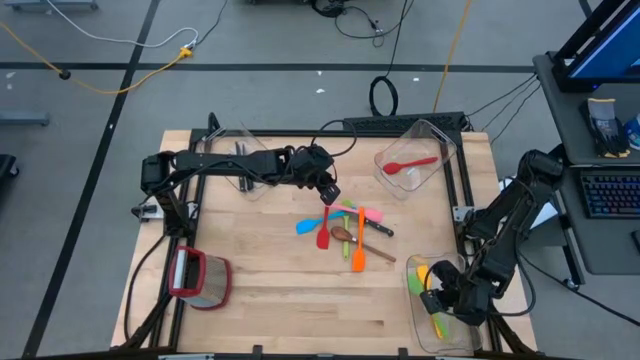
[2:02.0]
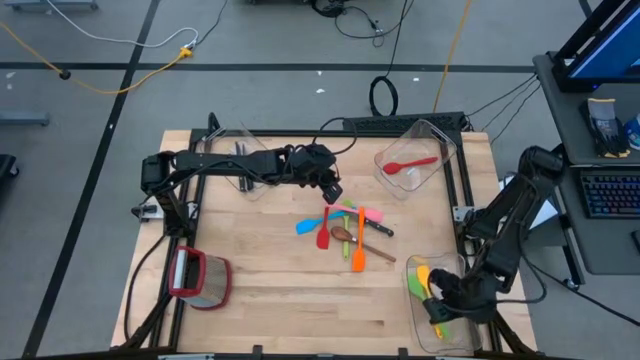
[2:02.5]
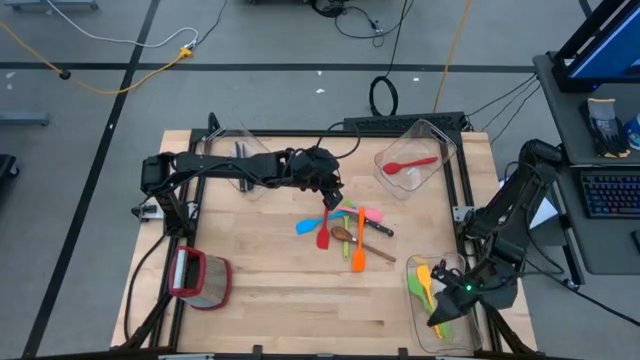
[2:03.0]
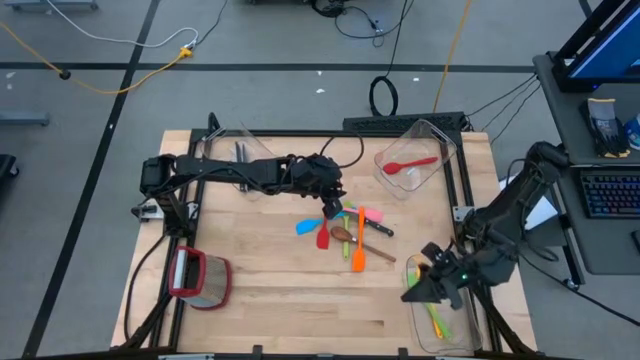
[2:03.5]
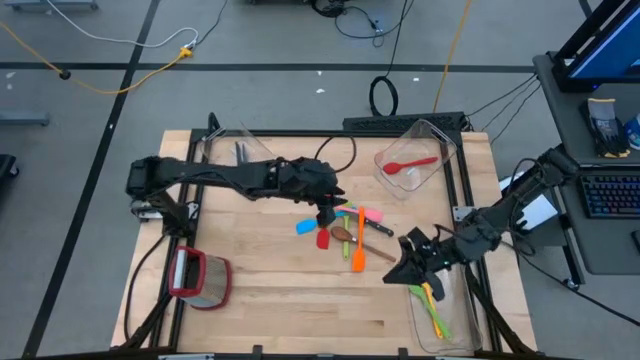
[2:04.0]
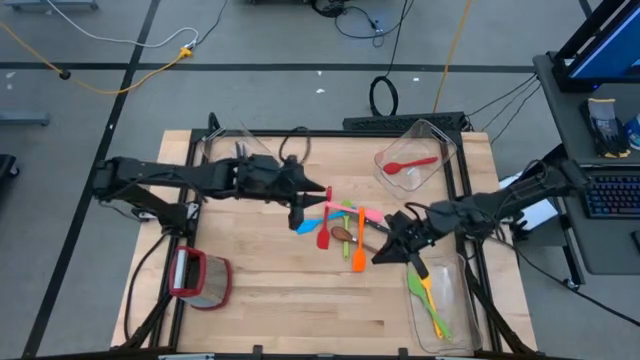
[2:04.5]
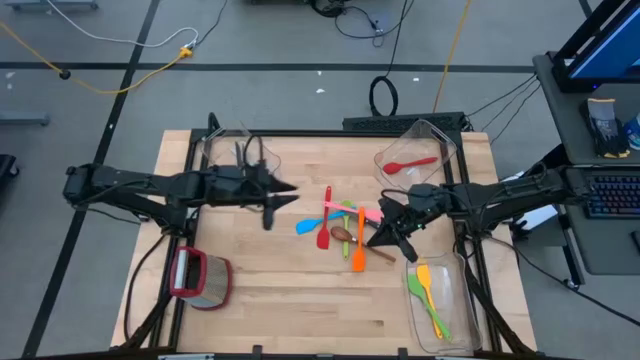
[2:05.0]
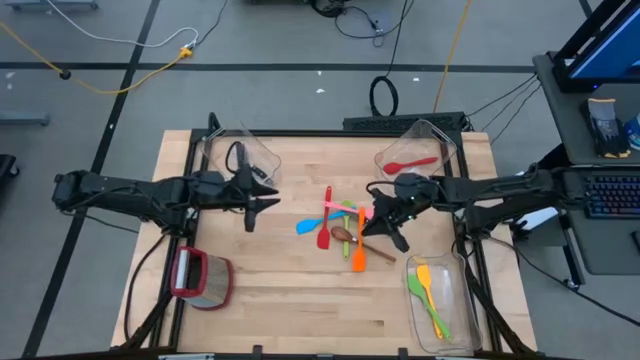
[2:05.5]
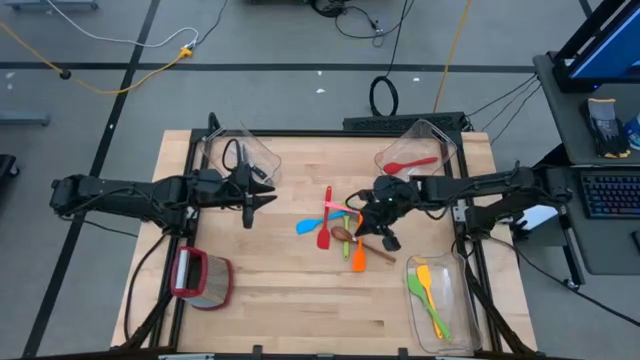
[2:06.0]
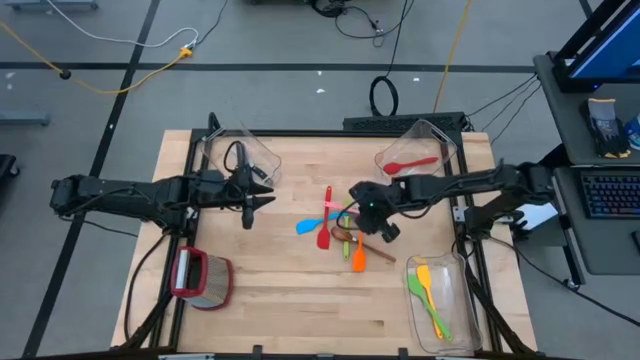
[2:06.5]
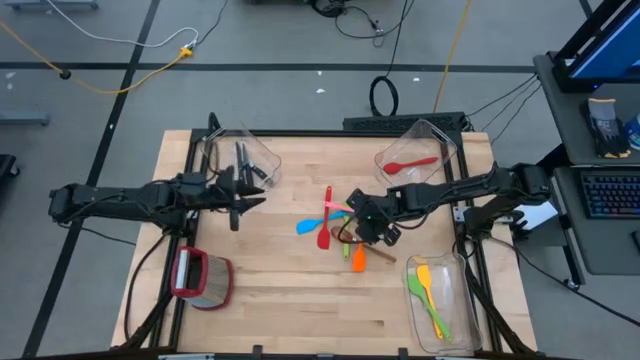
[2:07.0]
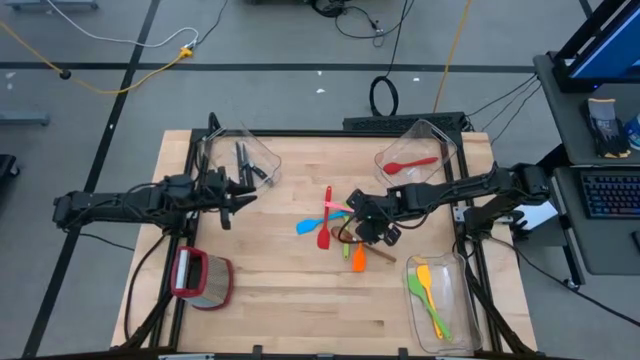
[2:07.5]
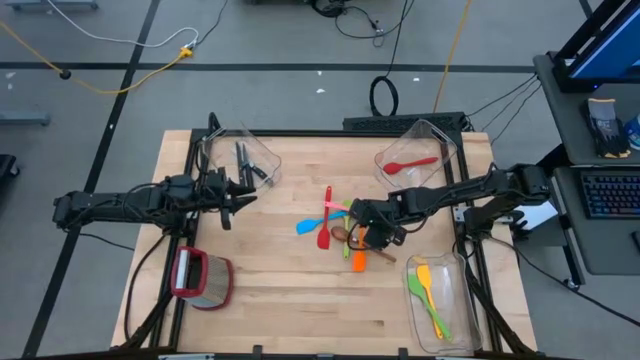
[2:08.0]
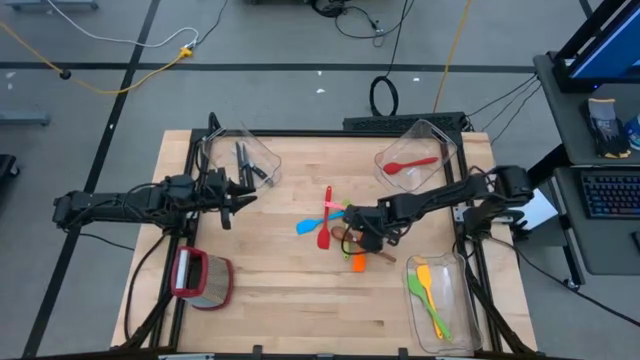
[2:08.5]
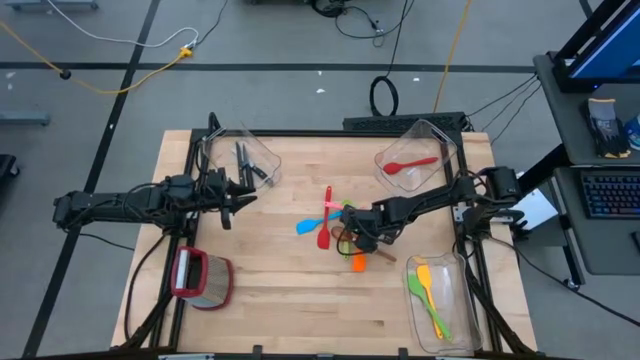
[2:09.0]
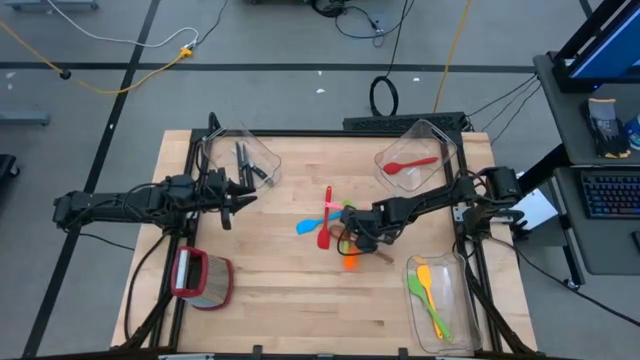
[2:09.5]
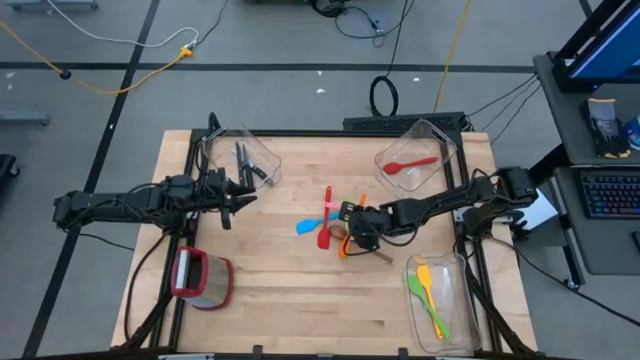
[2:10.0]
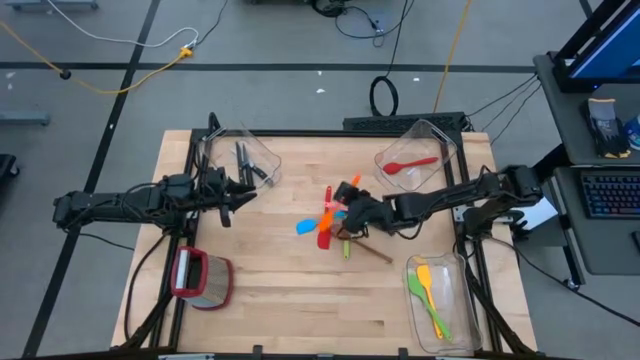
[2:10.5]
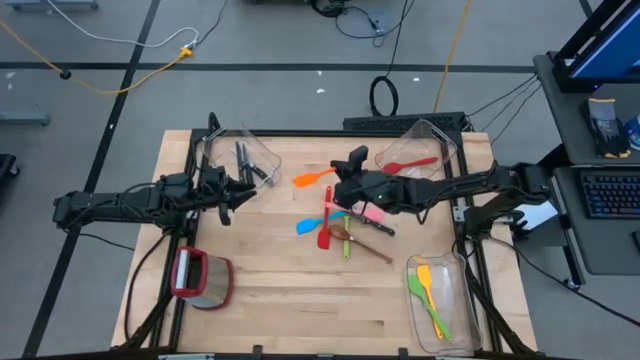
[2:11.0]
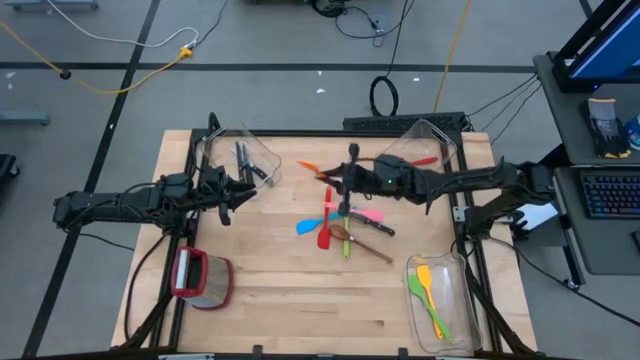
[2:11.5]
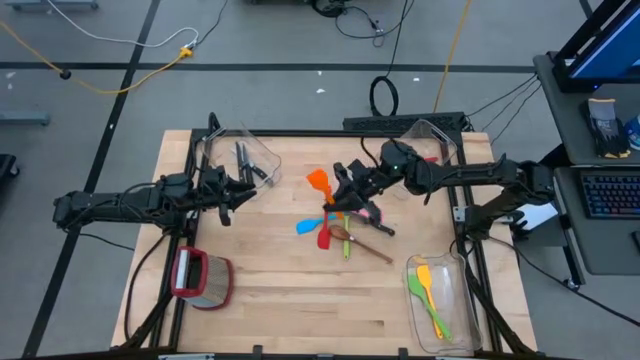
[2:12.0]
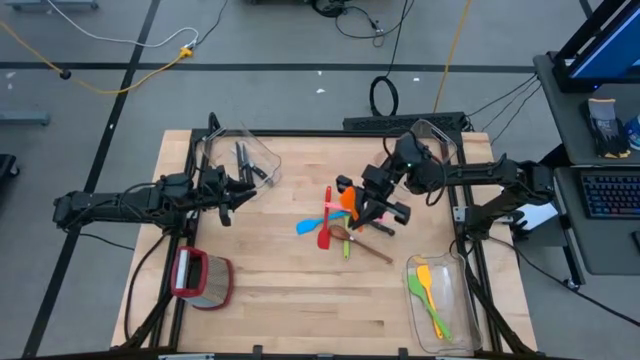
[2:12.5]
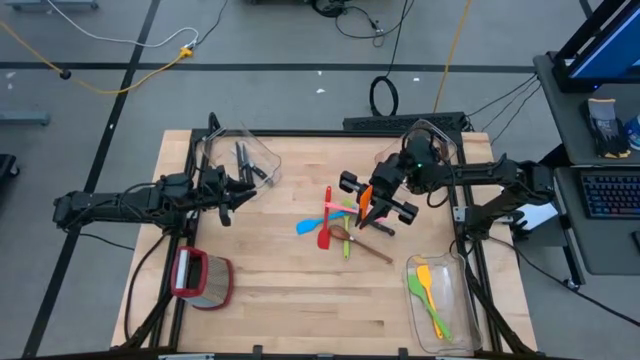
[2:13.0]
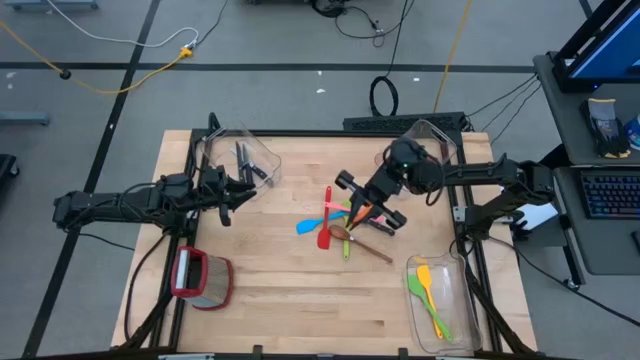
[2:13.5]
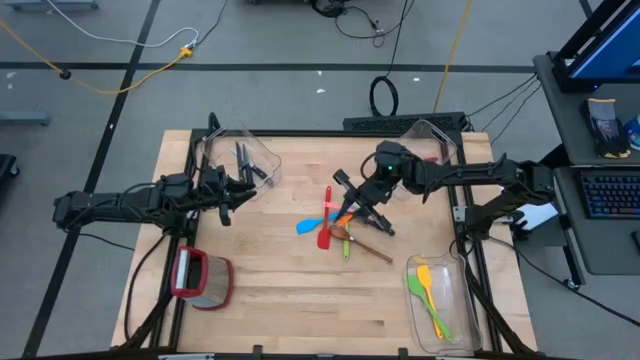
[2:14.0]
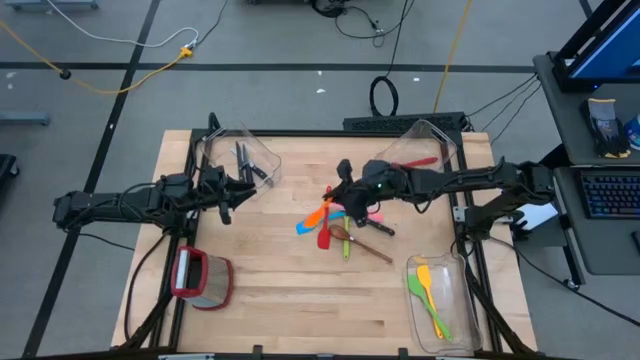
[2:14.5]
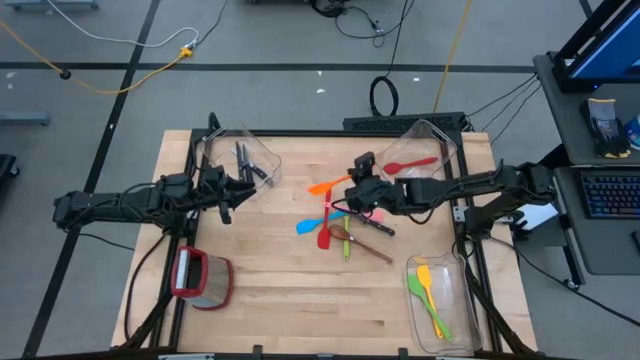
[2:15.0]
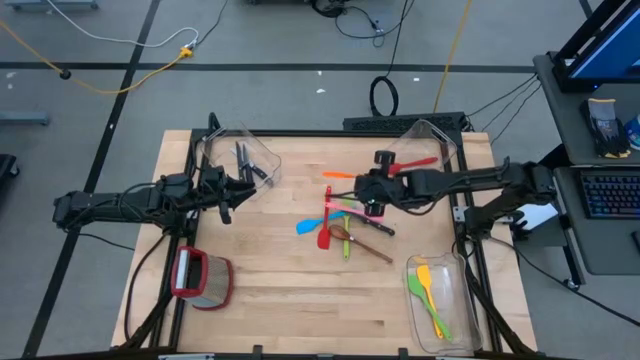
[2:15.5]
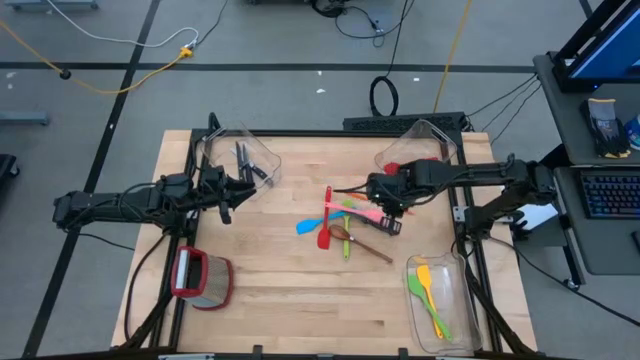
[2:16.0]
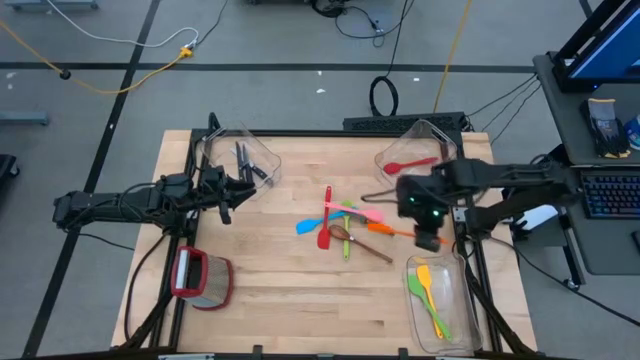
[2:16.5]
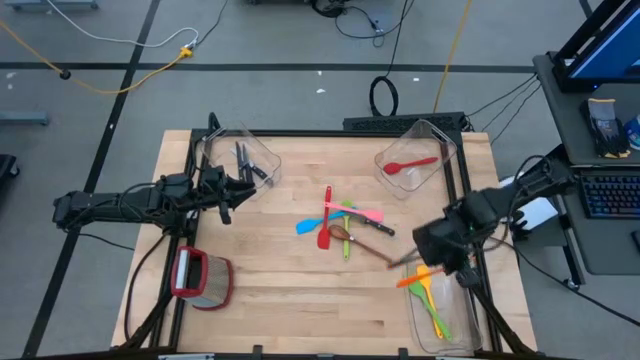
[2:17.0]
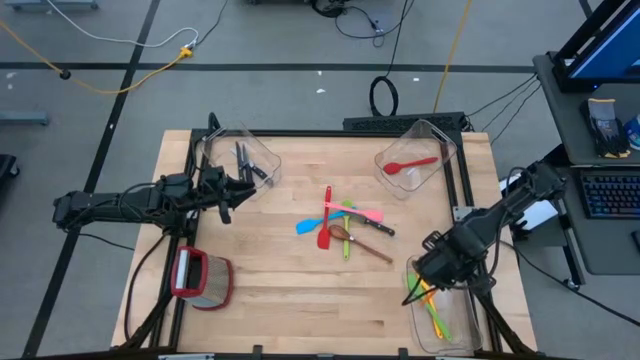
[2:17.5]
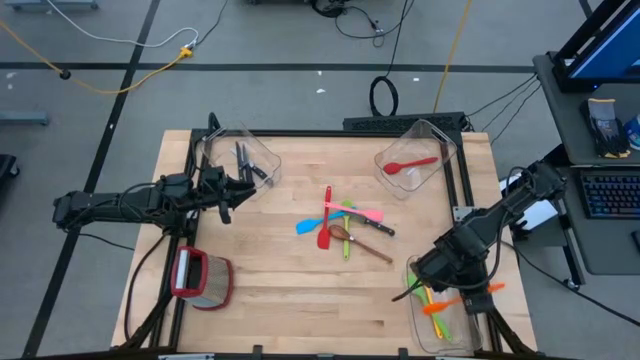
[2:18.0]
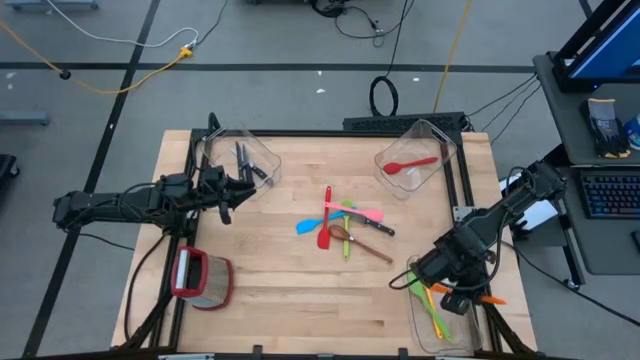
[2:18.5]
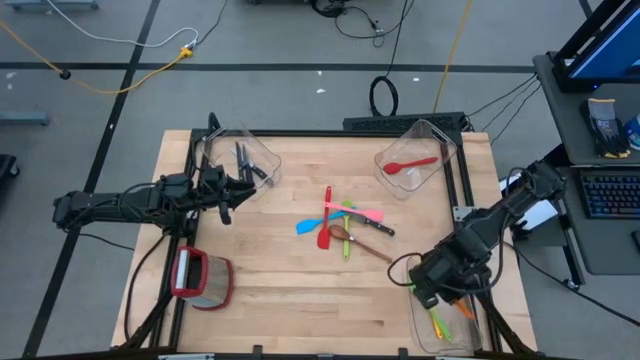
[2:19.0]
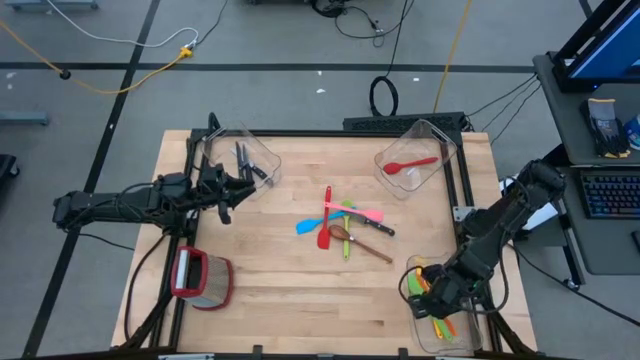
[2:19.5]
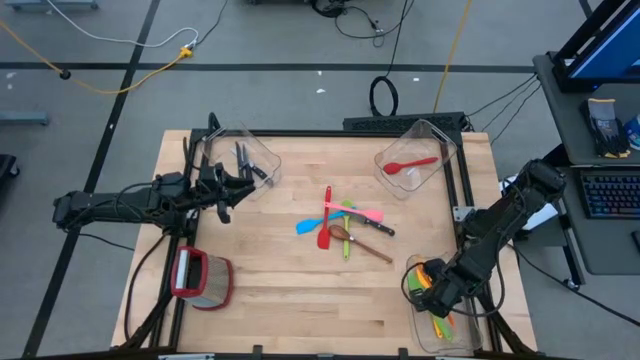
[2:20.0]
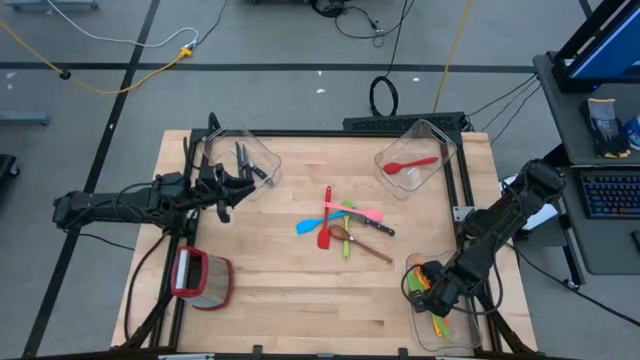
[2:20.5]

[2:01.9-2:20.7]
Task: Pick & Place Kitchen Items
Put the orange spatula into the bottom transparent bin

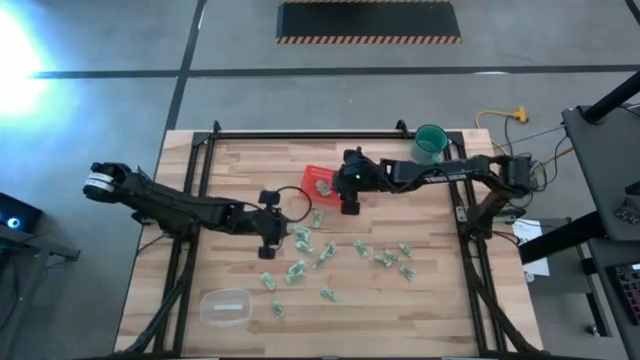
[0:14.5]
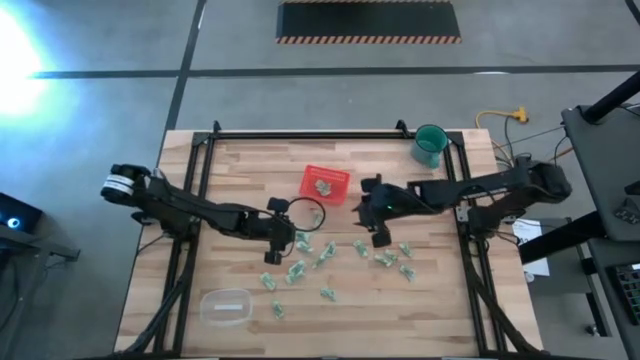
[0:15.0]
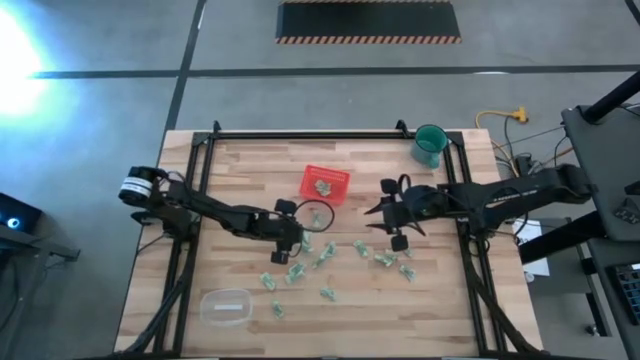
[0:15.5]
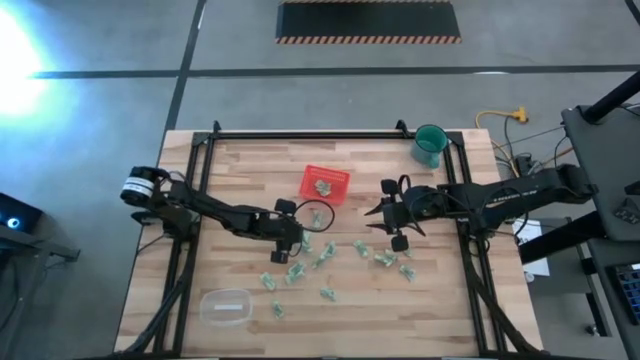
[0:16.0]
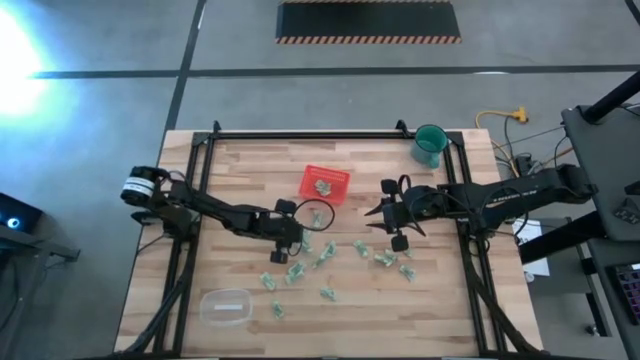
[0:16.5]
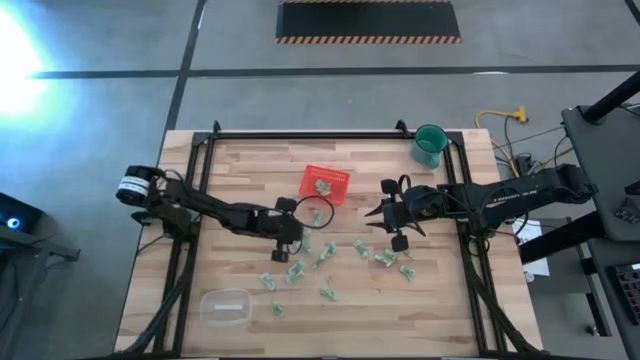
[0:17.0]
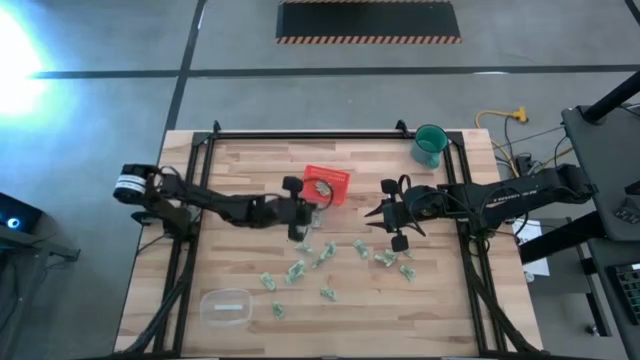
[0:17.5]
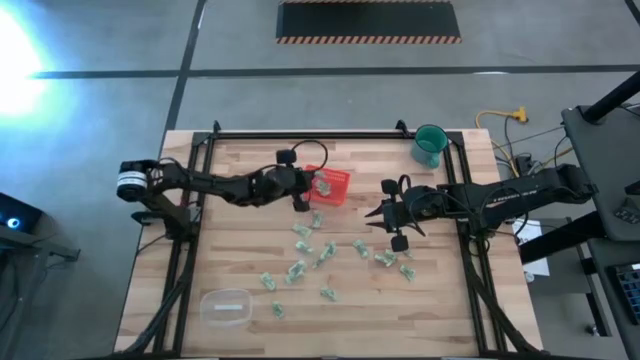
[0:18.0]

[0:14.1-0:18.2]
Task: Pick and place items into bin
Put the stevia packet into the orange bin
